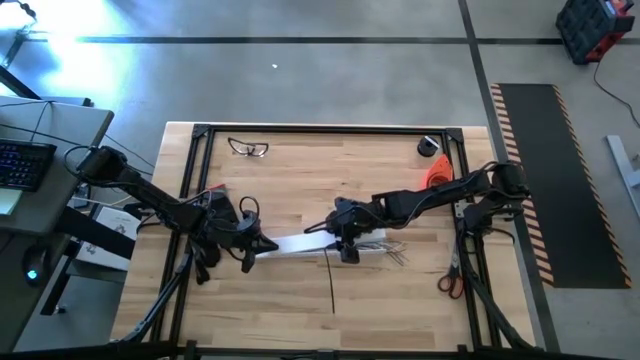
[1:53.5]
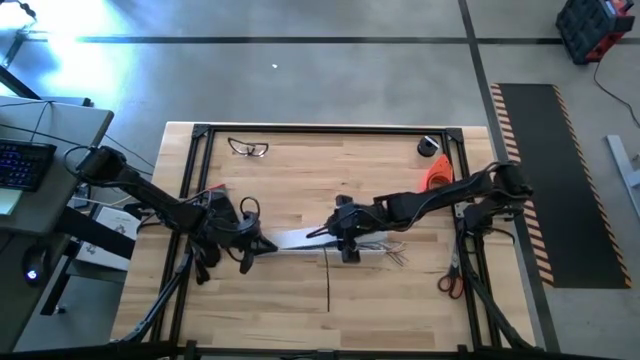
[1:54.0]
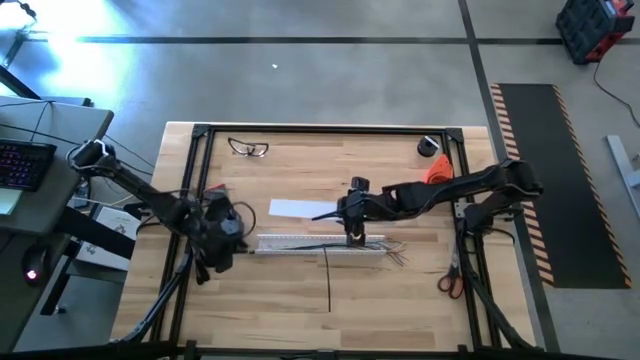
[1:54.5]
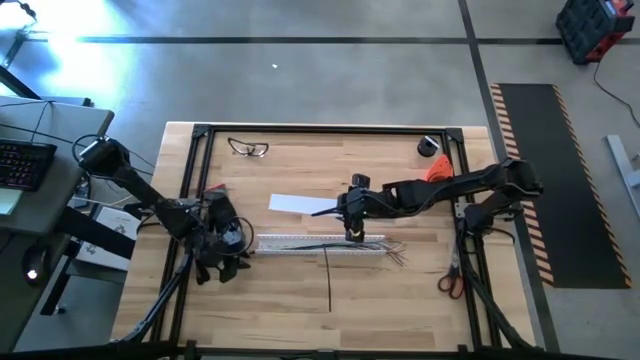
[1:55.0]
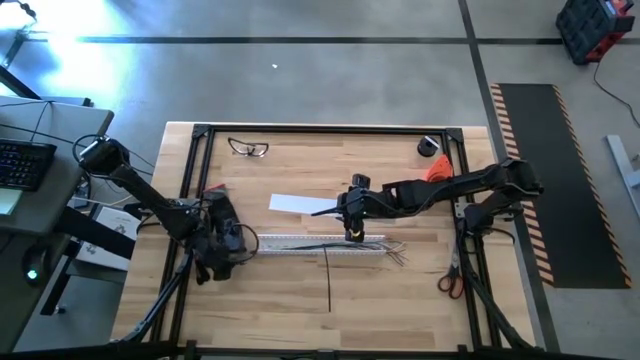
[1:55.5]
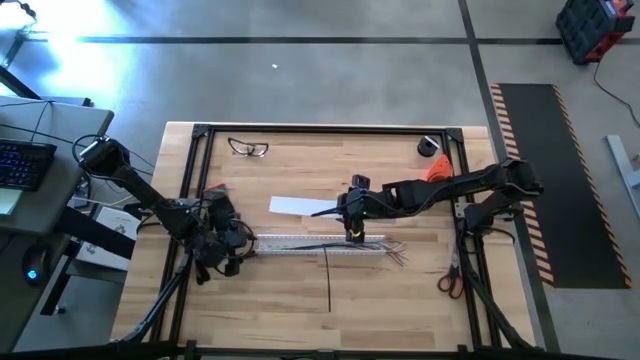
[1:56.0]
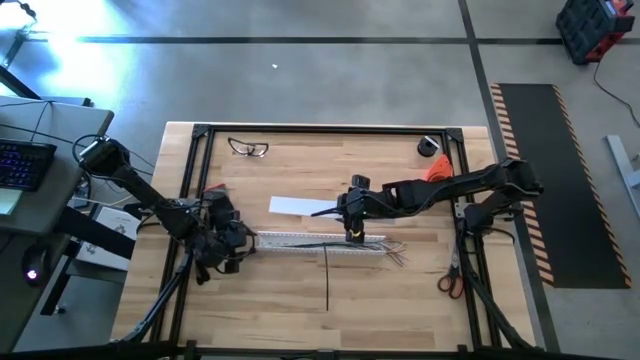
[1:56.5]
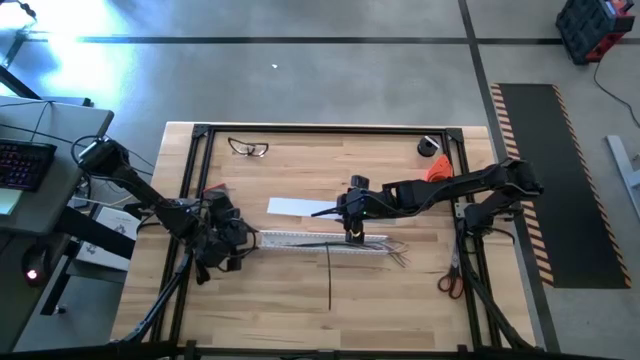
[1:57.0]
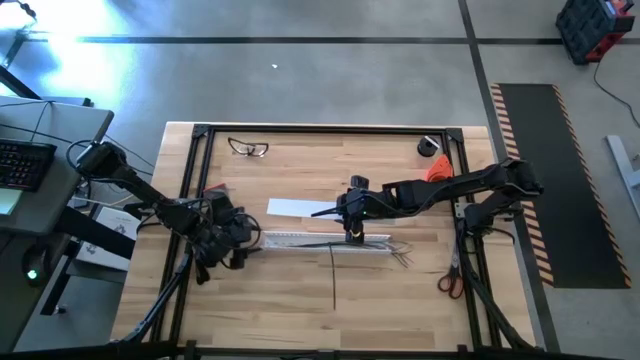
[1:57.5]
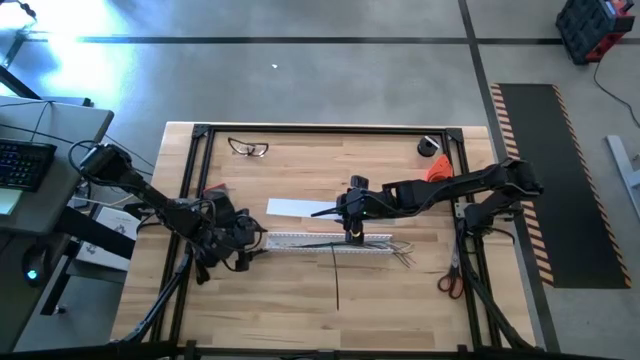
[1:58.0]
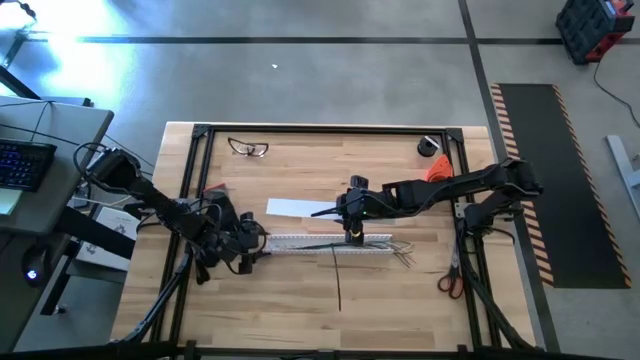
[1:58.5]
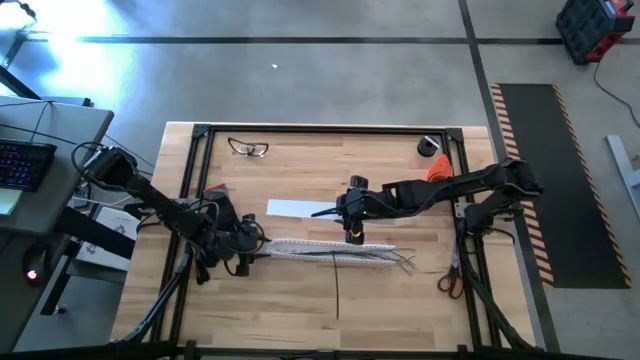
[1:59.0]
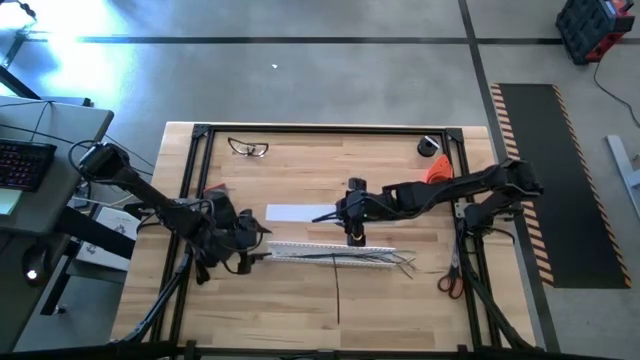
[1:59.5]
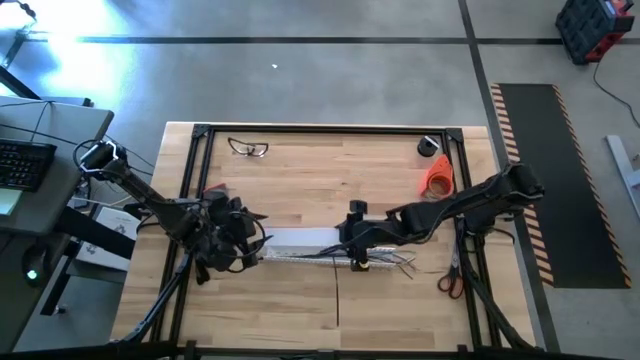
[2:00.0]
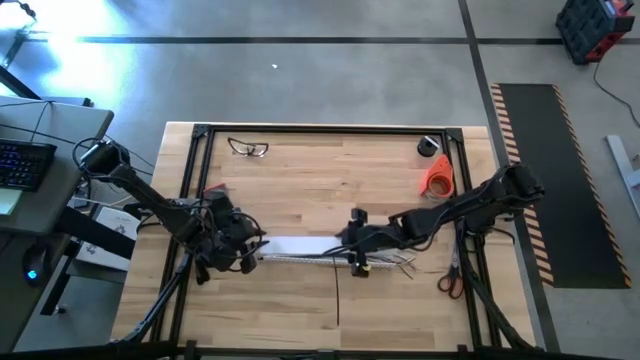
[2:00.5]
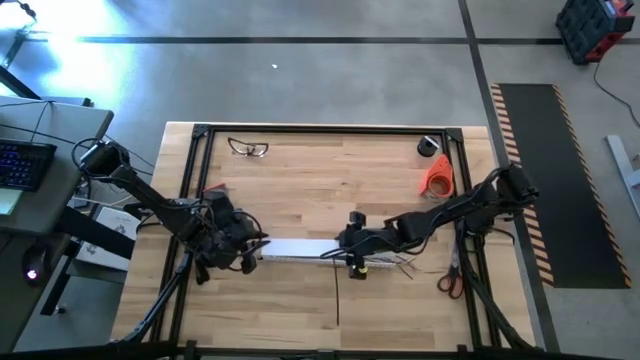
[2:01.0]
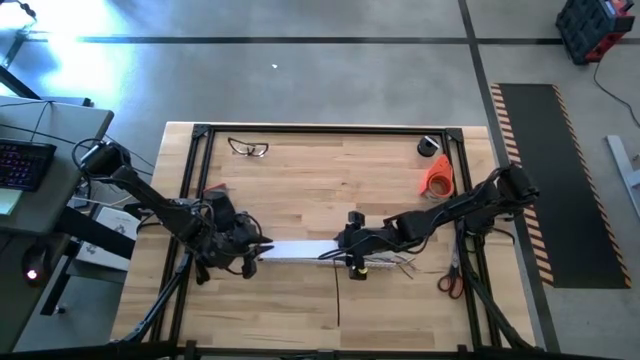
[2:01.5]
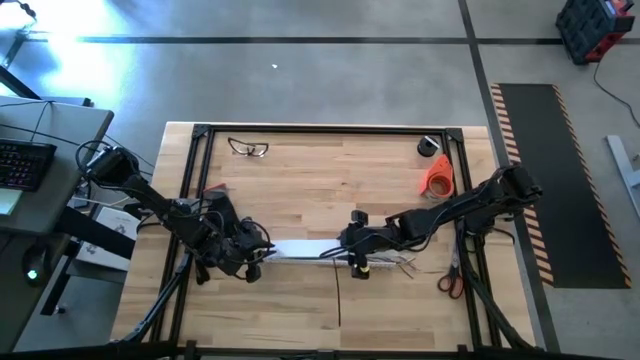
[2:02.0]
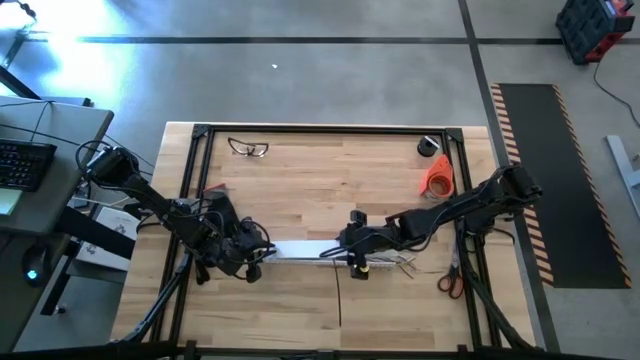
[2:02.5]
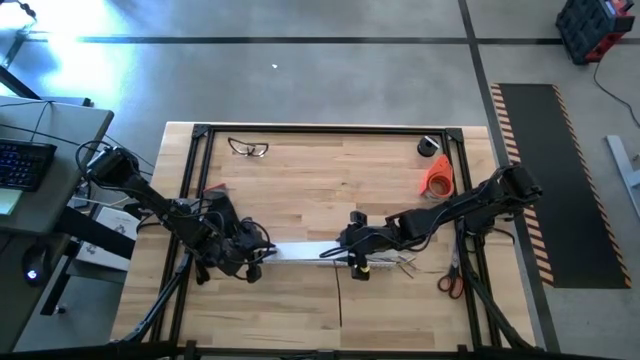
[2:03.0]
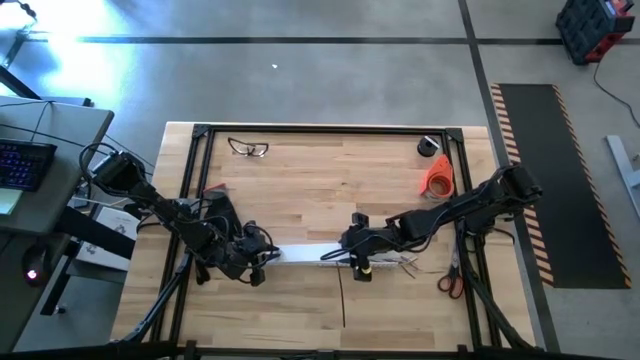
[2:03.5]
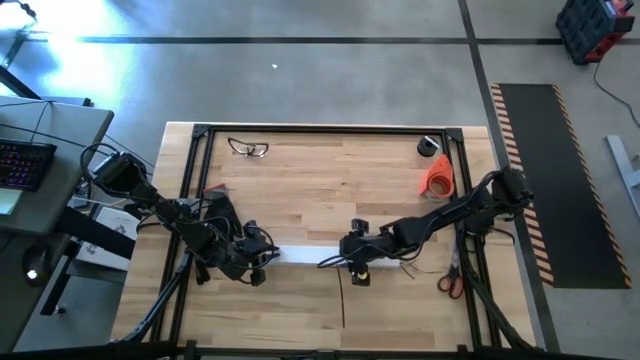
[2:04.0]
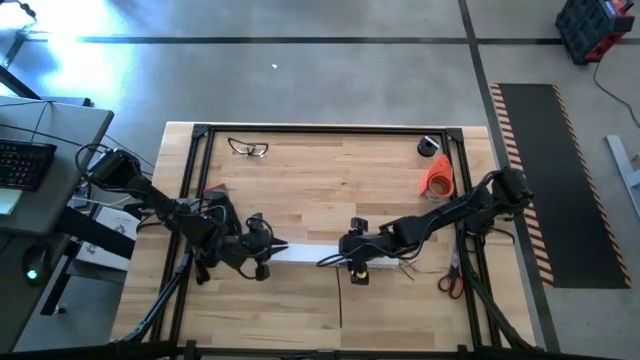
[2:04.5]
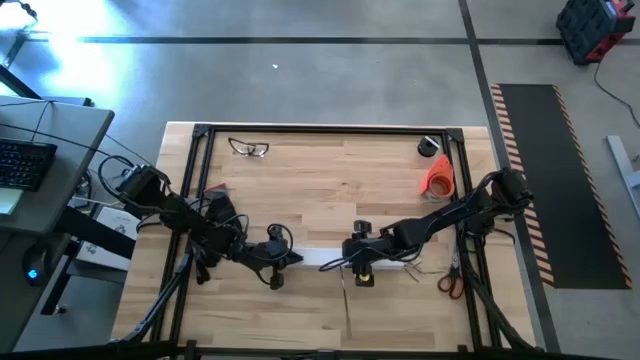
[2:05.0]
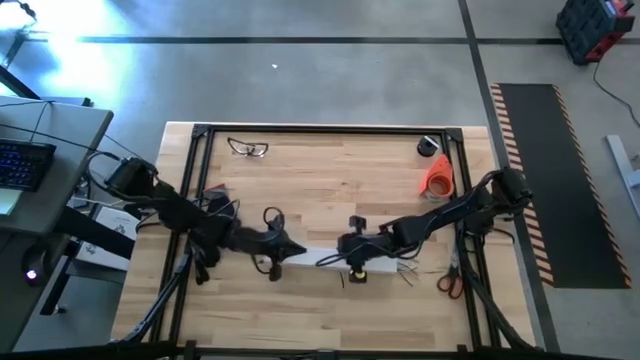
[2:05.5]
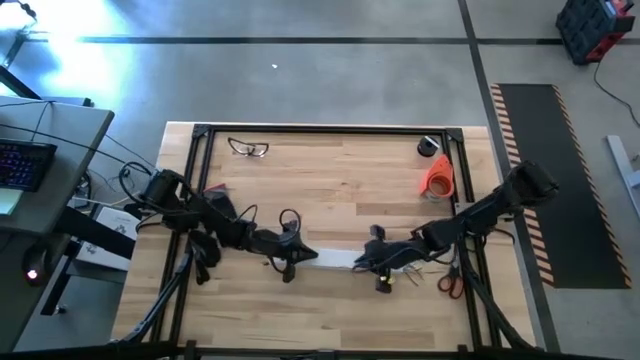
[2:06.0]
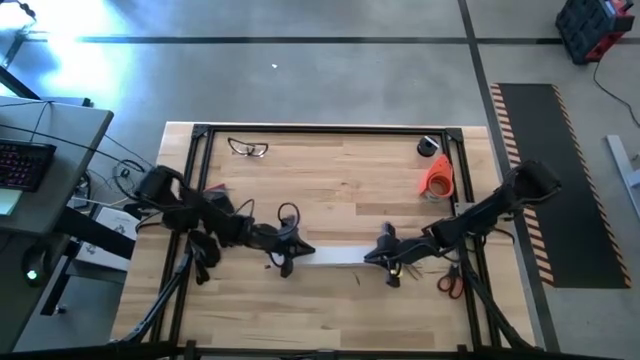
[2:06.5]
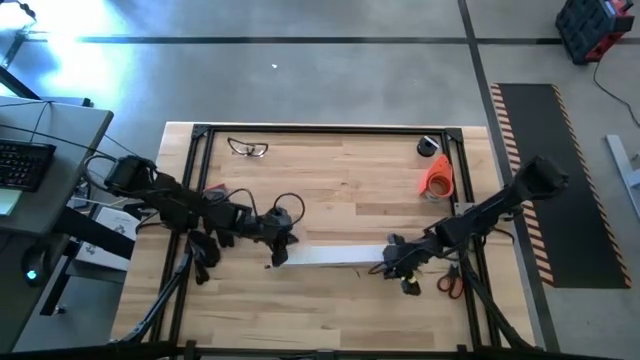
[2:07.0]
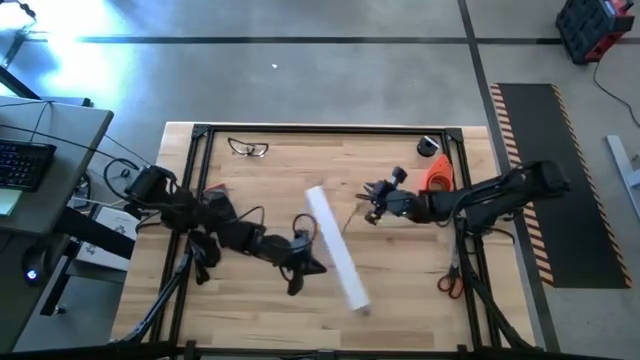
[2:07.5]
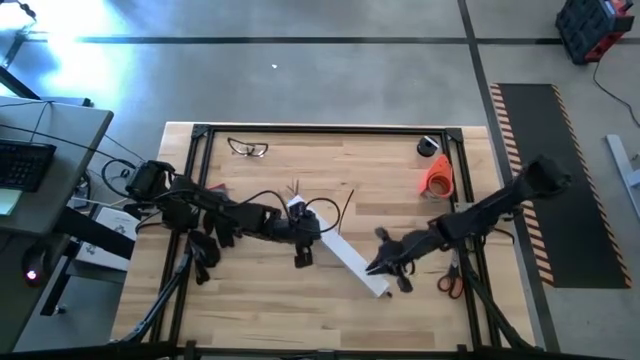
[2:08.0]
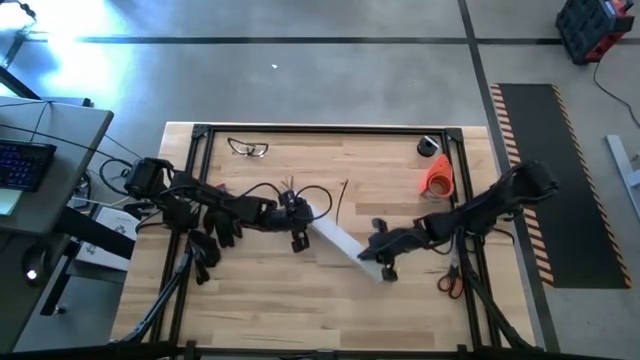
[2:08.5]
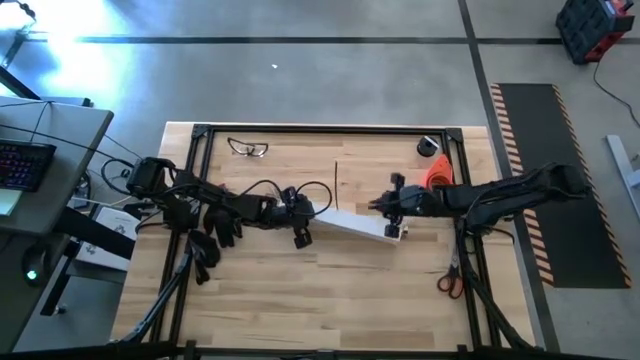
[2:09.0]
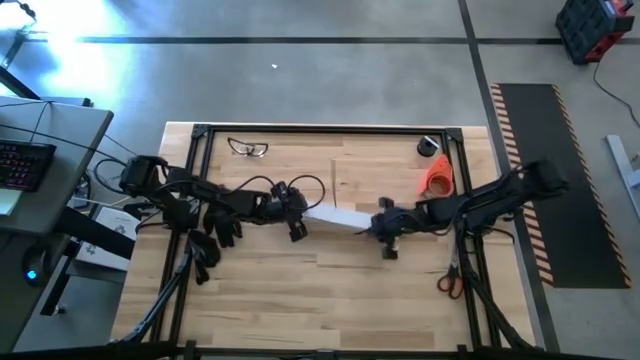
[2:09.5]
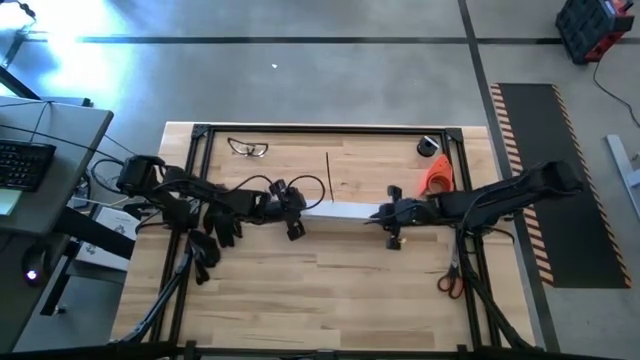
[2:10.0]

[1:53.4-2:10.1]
Task: Ziptie cables
Insert the white cable duct cover into the white cable duct

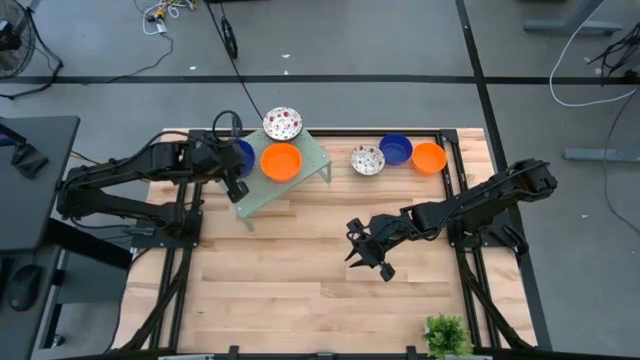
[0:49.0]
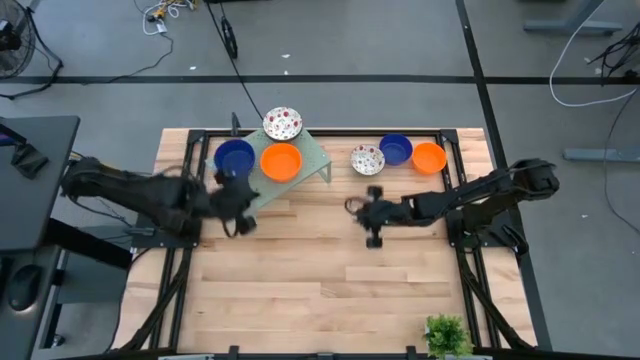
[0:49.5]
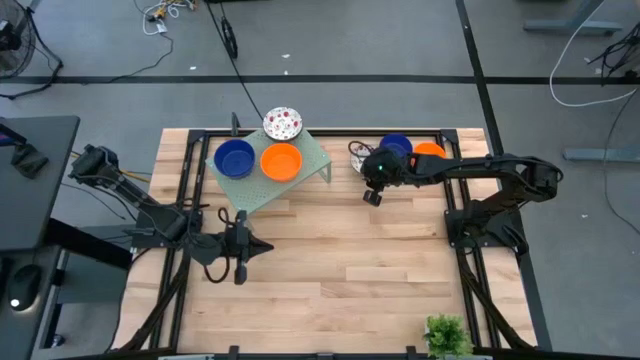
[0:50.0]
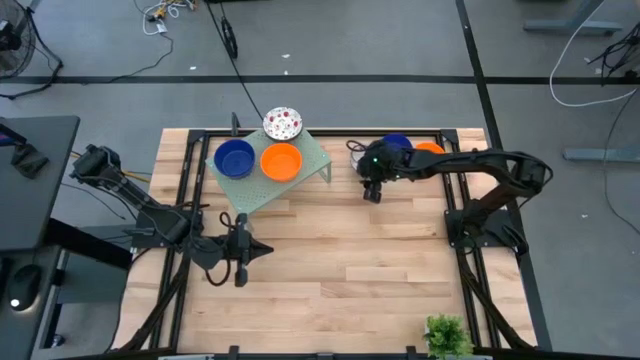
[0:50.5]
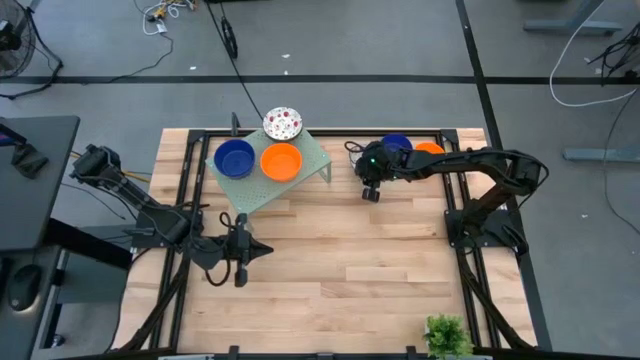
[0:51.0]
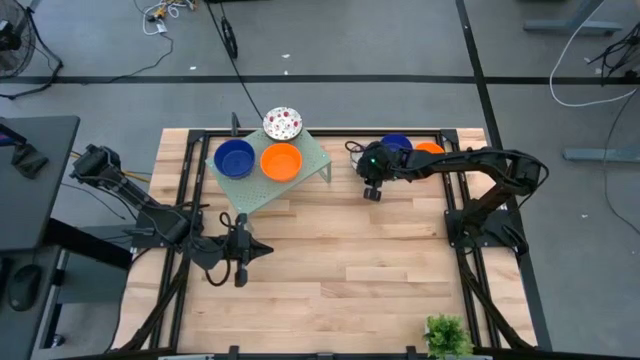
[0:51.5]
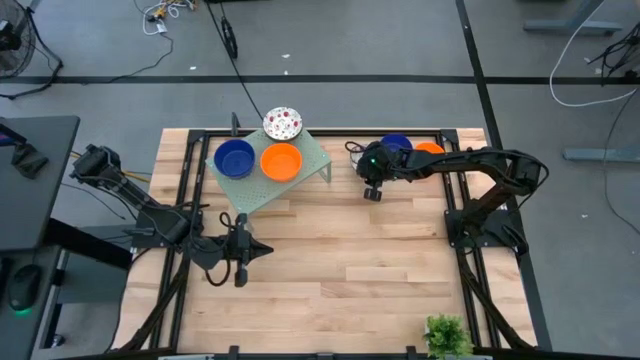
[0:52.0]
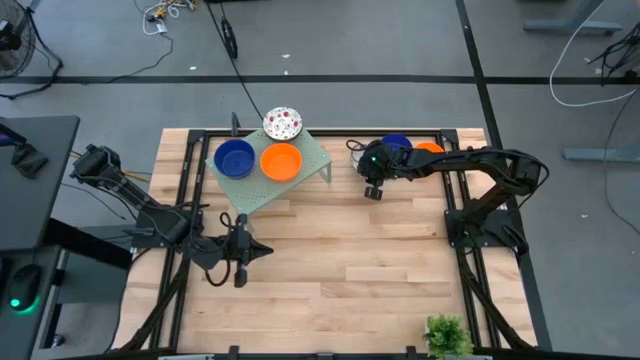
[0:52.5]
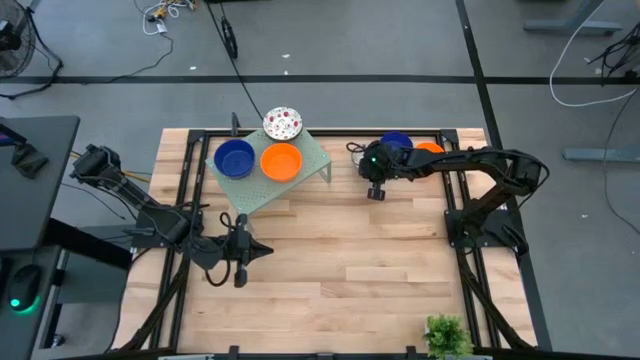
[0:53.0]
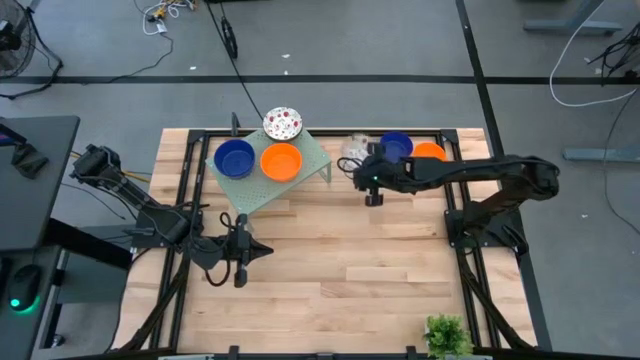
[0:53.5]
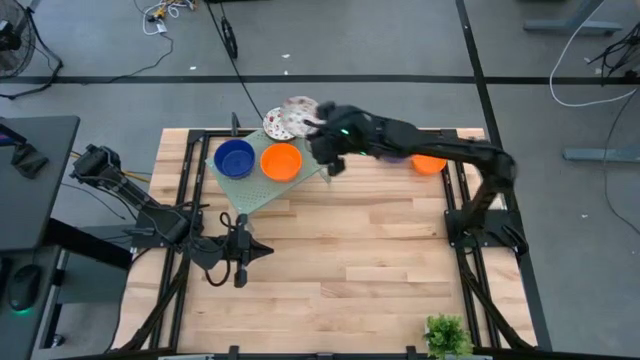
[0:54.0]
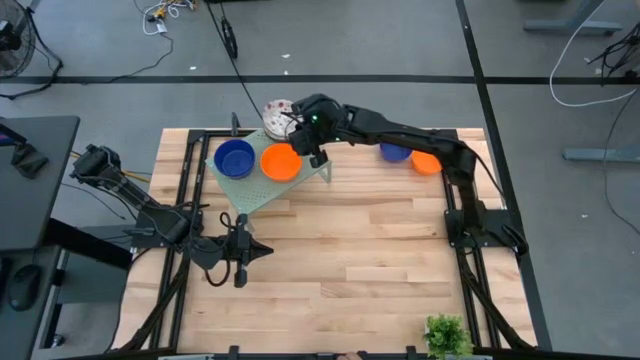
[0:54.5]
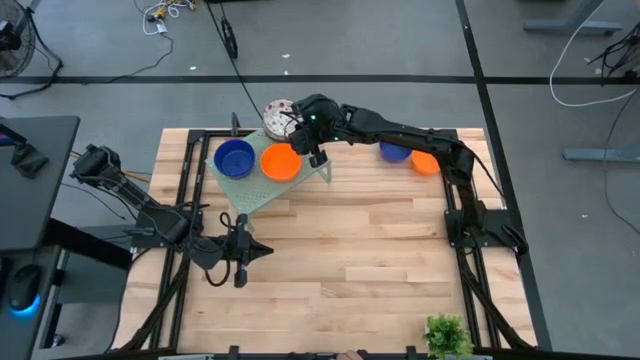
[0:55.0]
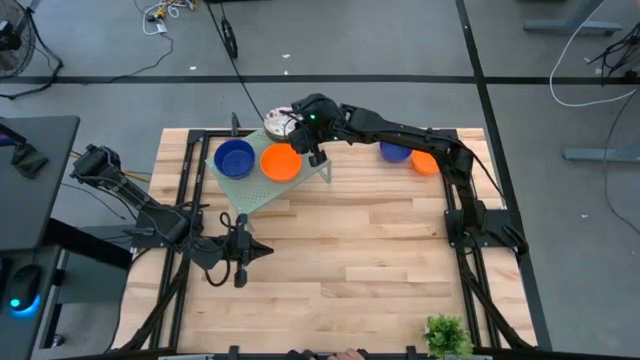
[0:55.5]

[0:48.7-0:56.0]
Task: Pick & Place Mini bowls
Stack the green bowl on the green bowls on the shelf
